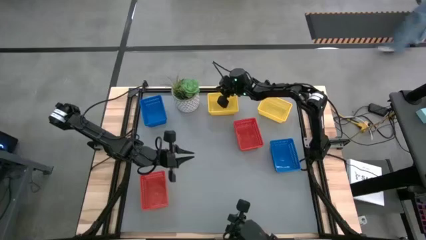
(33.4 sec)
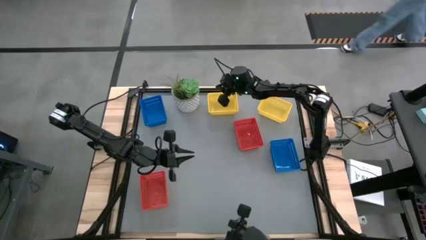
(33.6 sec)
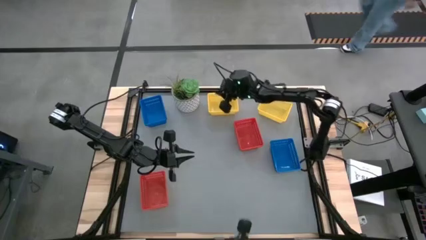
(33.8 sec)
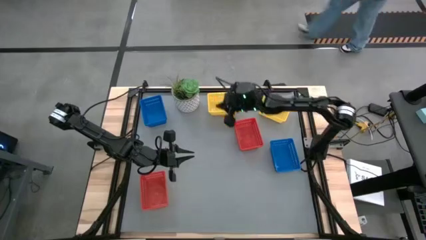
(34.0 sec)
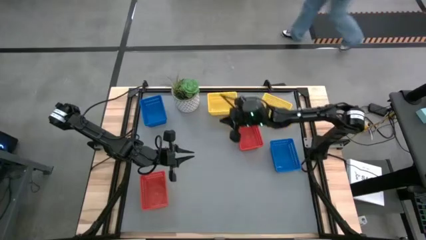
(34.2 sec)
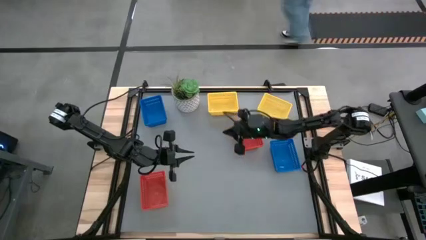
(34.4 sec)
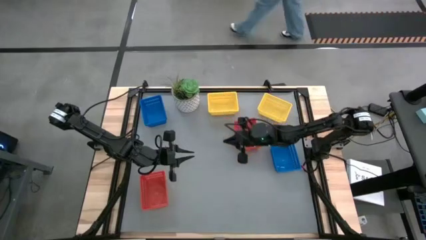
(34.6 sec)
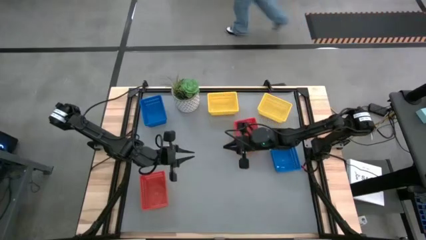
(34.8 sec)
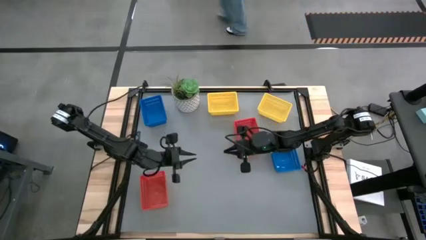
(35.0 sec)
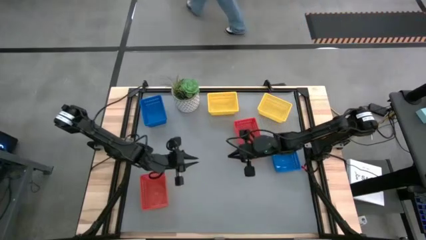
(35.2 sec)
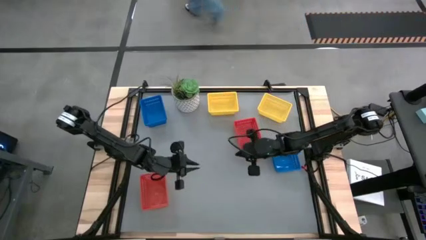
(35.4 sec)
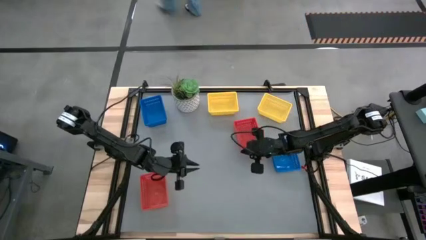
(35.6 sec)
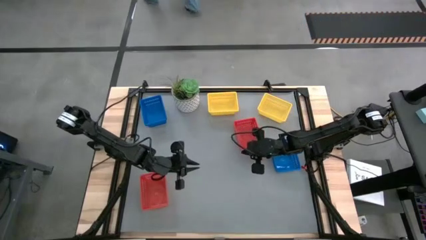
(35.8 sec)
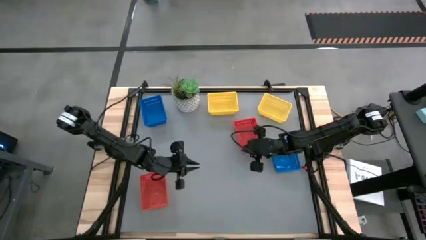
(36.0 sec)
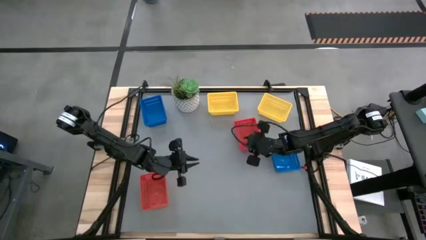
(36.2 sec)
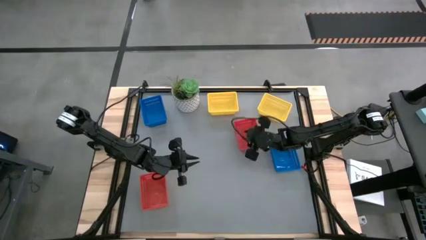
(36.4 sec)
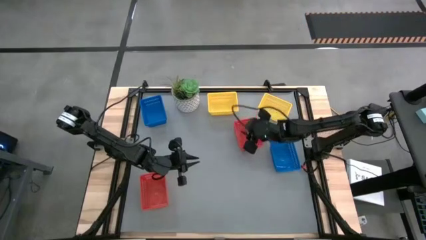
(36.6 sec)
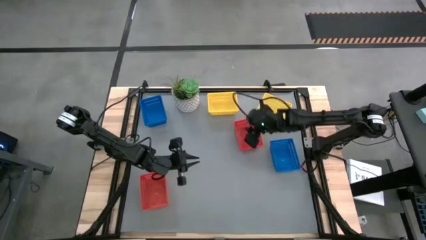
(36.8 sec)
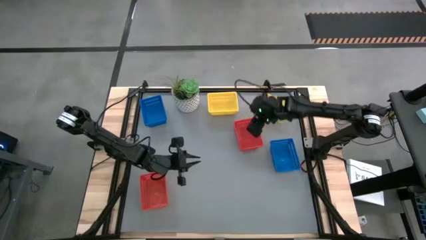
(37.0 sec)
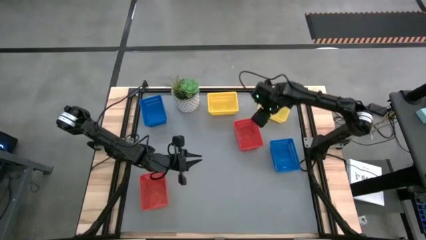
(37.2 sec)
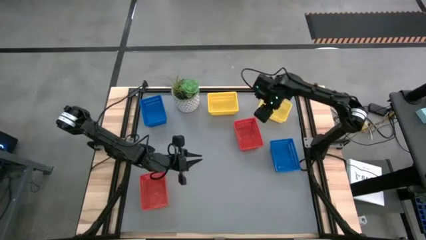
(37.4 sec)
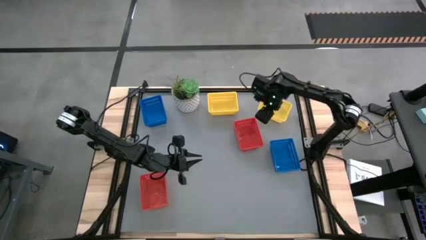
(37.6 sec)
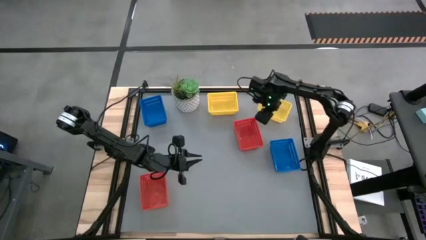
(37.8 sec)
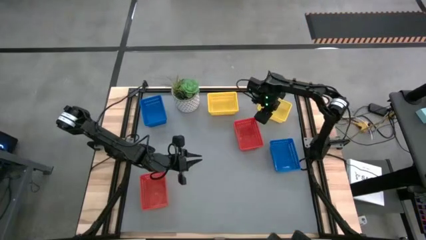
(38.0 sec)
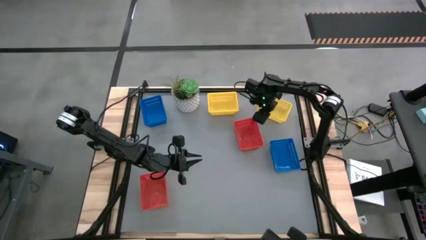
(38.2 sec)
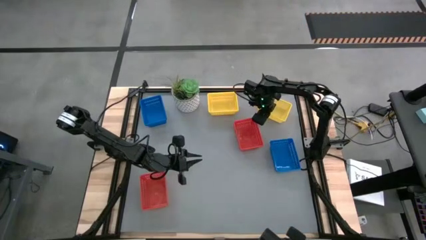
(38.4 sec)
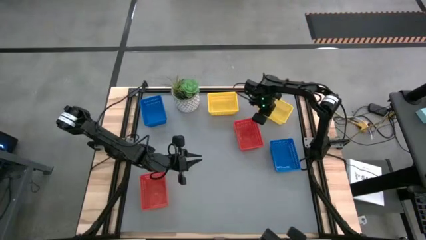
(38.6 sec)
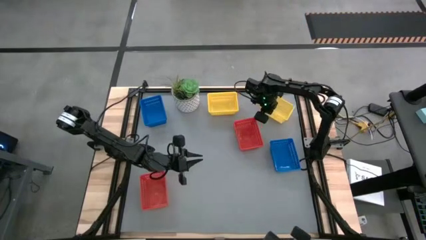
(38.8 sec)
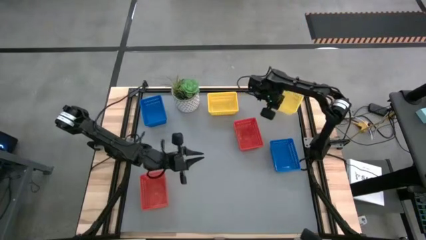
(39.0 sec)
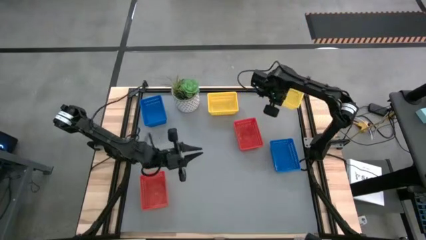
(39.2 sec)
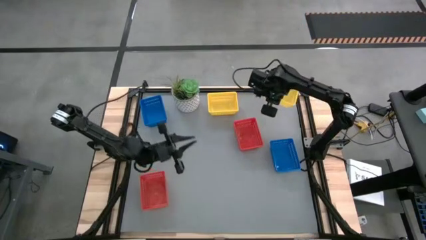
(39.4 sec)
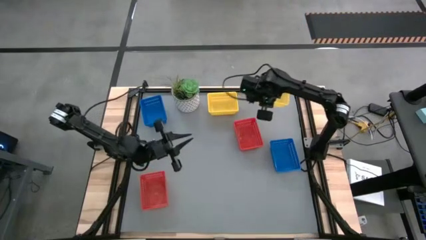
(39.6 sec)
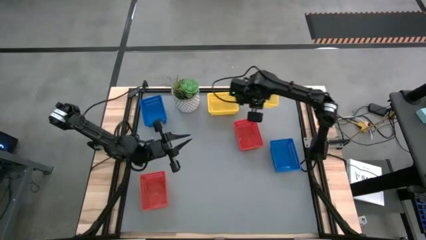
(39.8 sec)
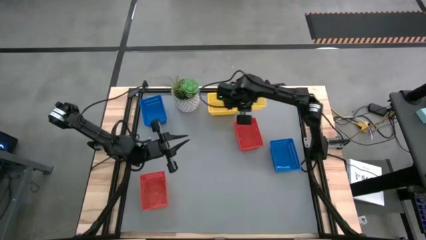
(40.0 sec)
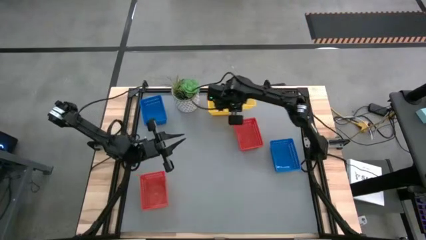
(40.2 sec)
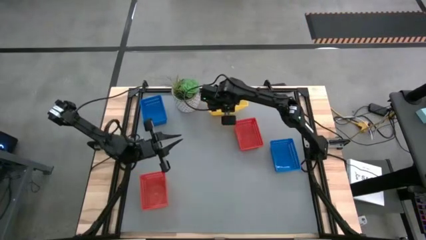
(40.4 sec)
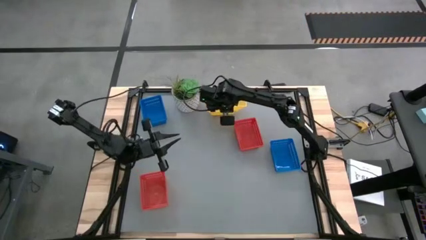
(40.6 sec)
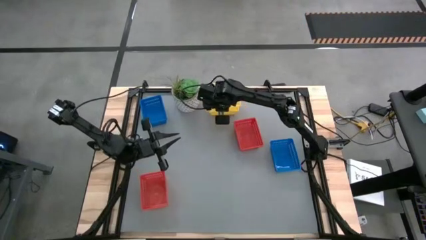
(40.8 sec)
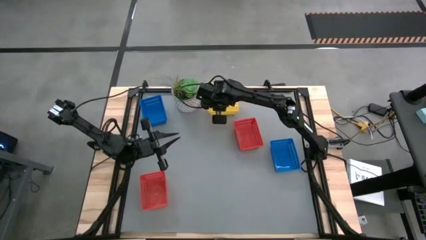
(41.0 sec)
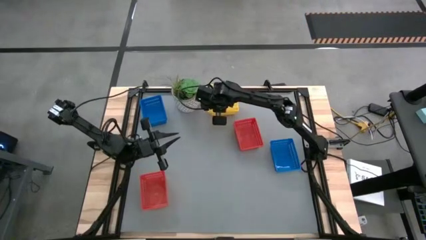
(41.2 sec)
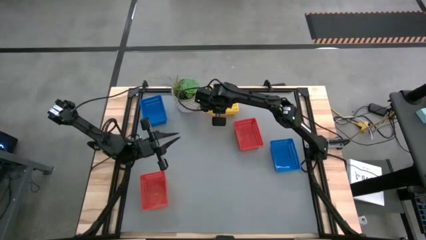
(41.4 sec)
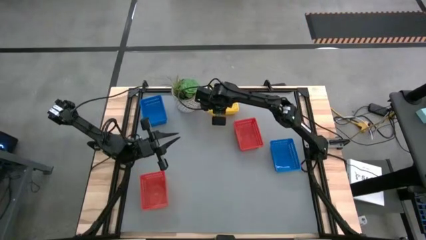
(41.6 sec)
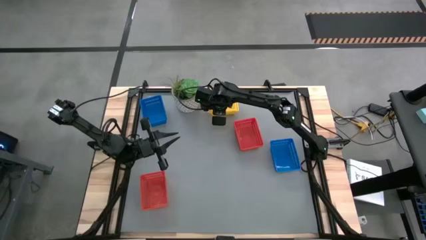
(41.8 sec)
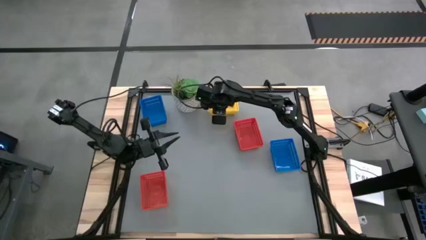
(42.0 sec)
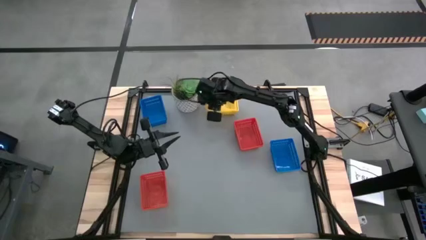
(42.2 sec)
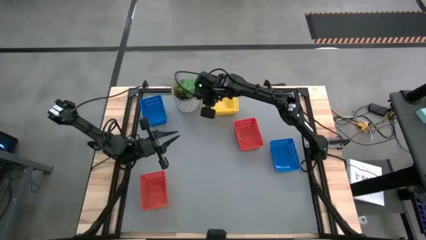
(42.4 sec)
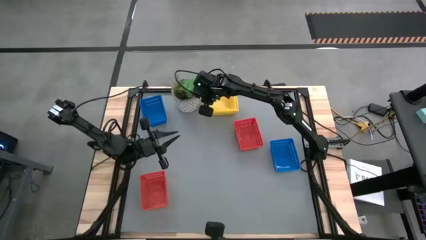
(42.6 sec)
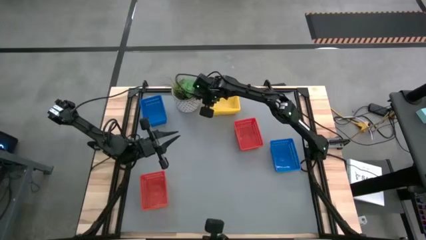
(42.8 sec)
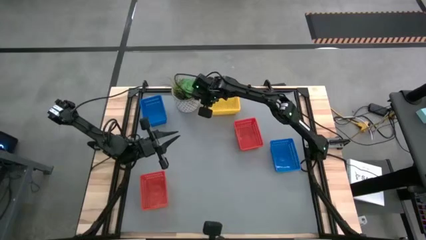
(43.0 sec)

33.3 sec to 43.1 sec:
Stack the right yellow bin on top of the left yellow bin

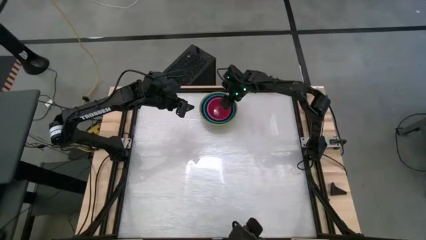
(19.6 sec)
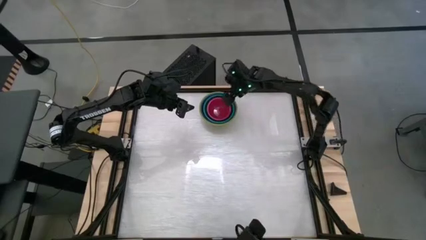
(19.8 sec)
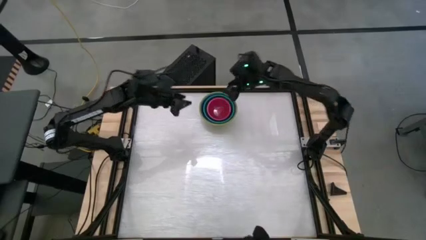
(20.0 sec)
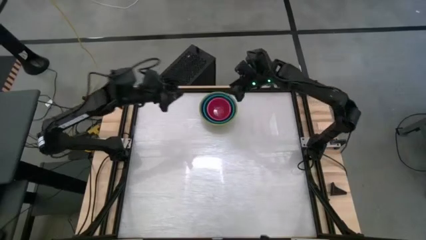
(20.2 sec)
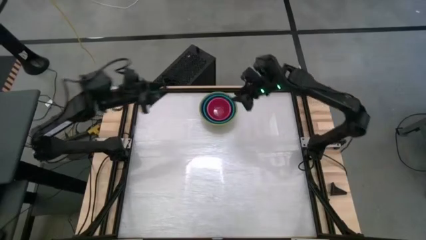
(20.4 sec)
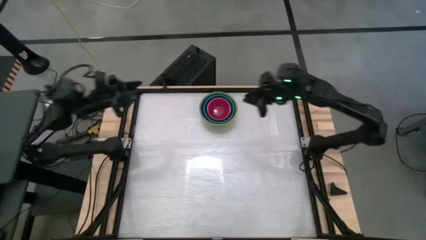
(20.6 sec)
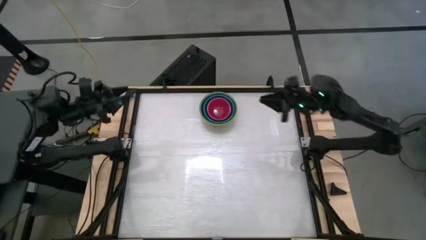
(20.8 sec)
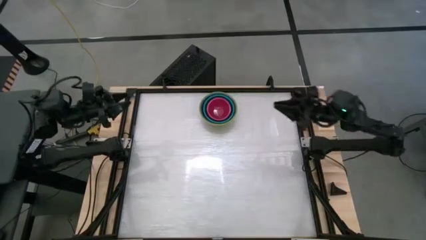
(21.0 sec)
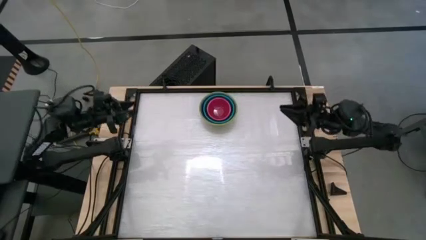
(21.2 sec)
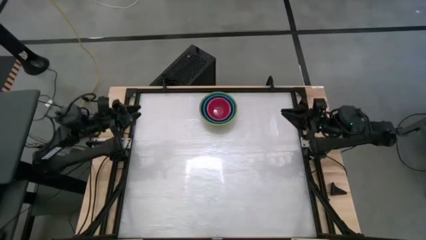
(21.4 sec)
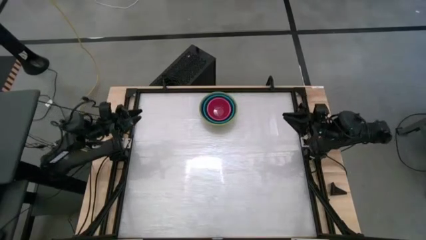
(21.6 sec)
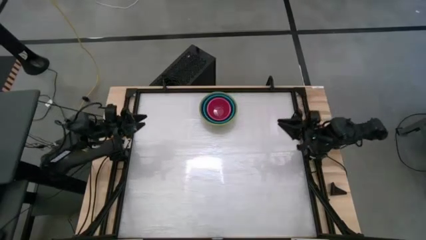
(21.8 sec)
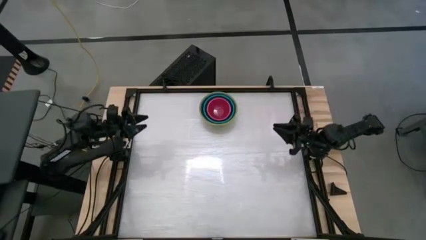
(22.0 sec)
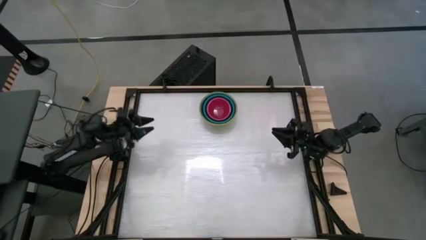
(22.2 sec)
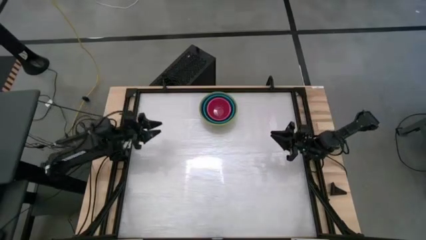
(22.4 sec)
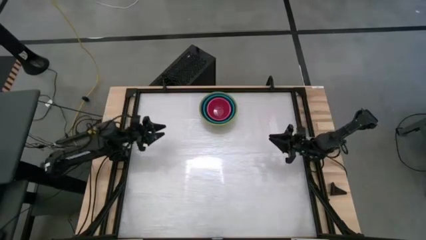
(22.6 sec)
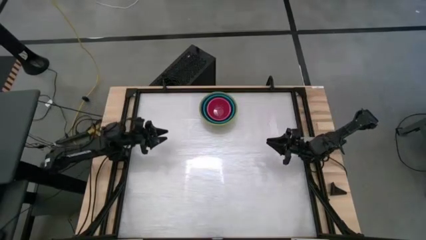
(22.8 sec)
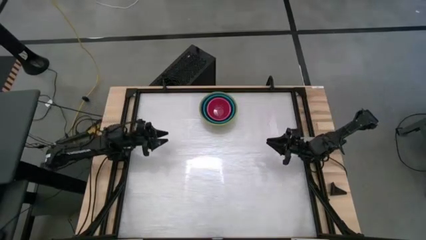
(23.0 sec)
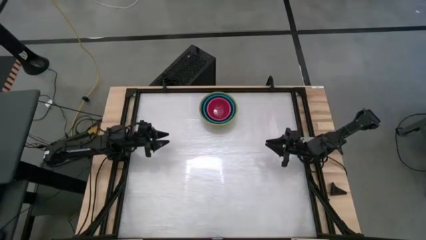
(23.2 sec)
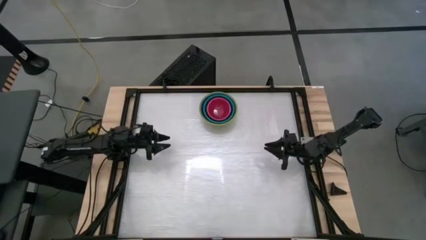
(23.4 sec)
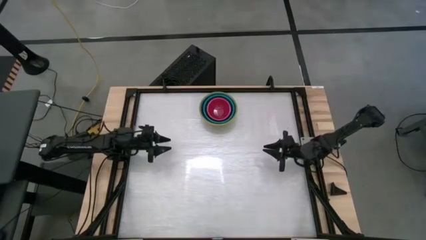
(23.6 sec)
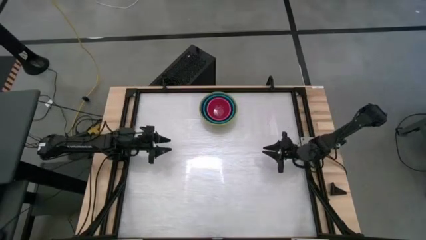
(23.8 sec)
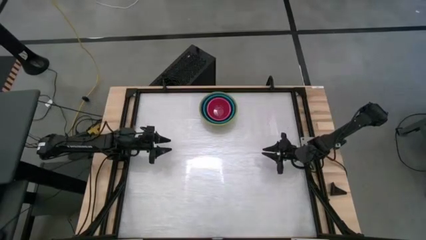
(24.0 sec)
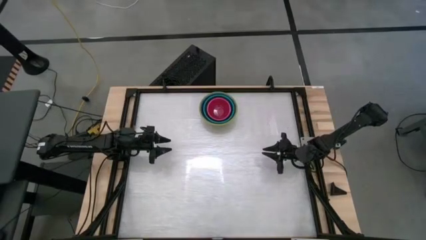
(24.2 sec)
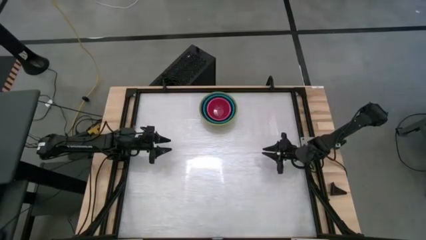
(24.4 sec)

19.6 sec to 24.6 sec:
Return to Home Position
